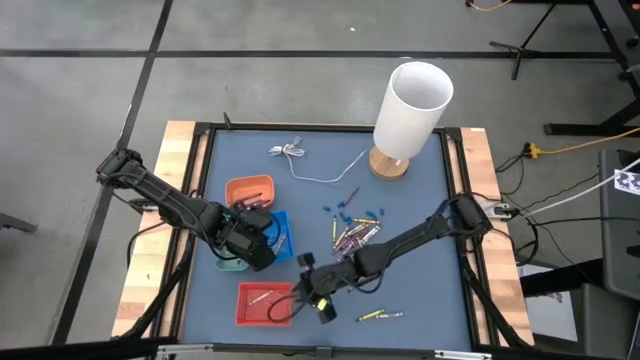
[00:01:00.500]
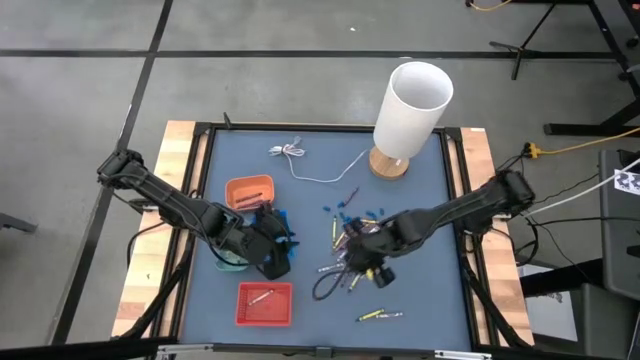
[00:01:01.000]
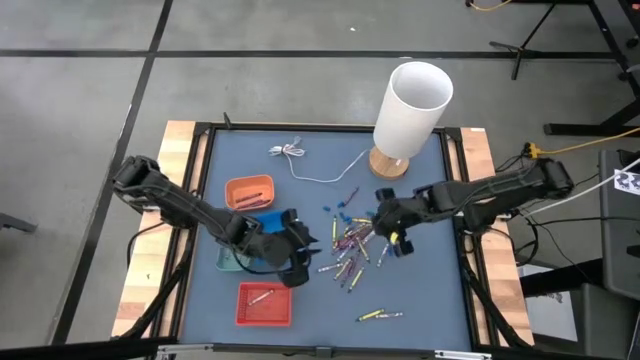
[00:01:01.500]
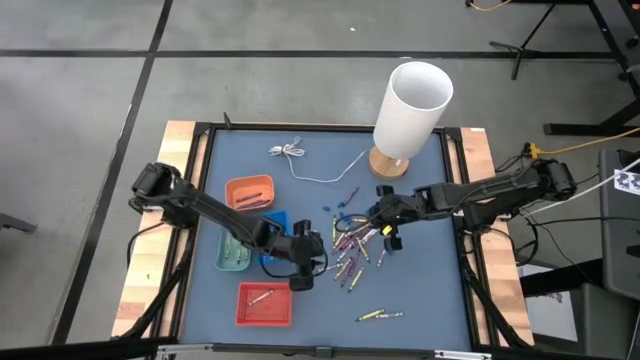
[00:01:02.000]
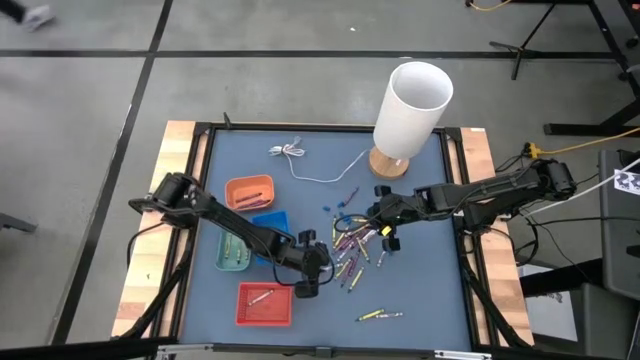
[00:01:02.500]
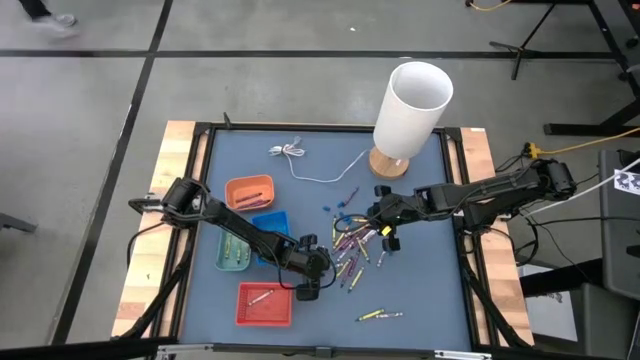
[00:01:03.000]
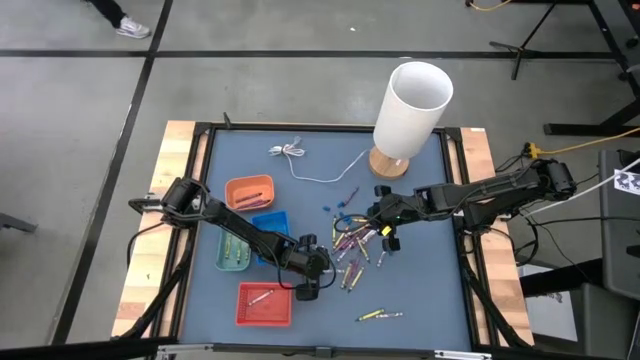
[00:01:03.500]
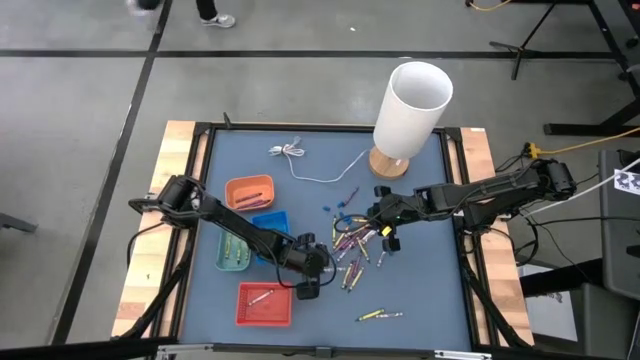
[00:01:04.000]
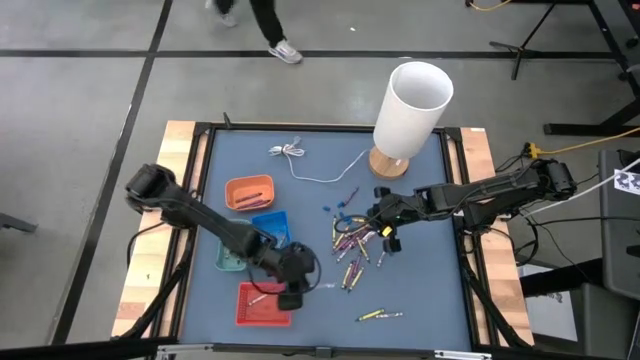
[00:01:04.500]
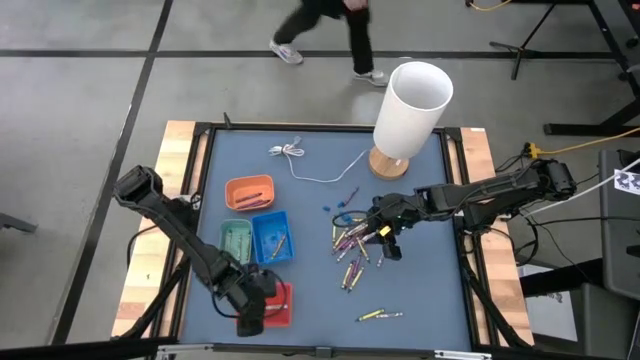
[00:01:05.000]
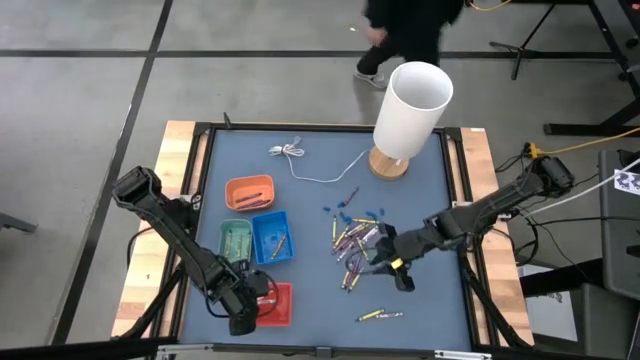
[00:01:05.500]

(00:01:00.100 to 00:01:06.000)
Task: Sort crayons
Put the grey crayon into the orange bin

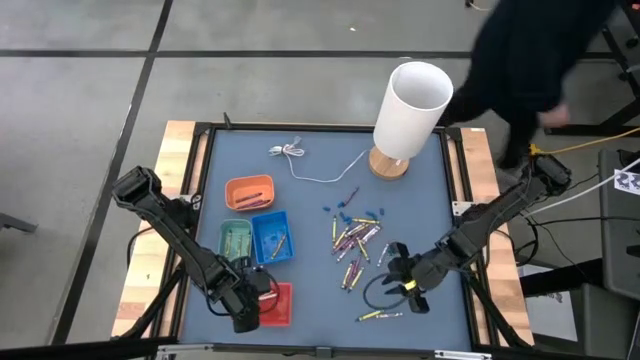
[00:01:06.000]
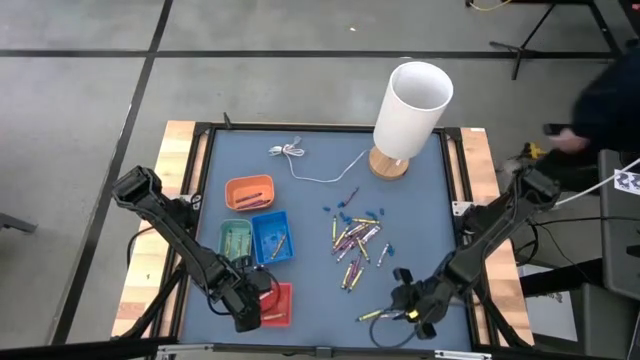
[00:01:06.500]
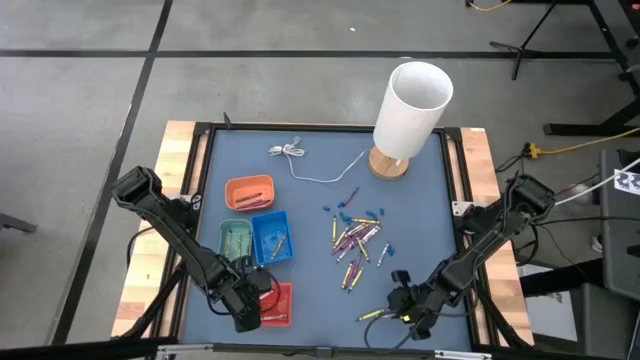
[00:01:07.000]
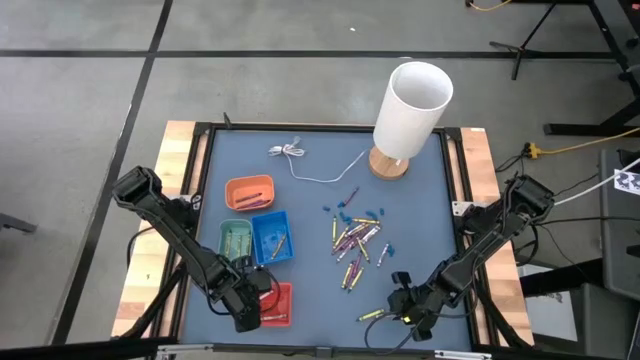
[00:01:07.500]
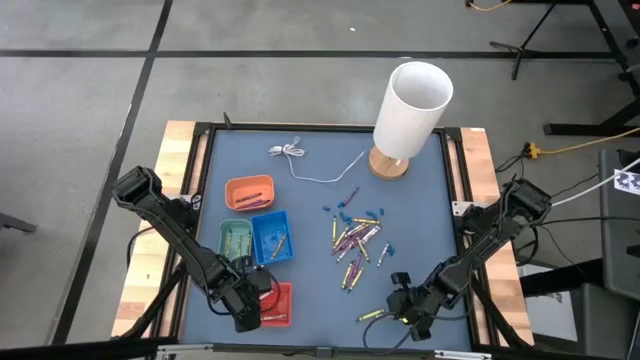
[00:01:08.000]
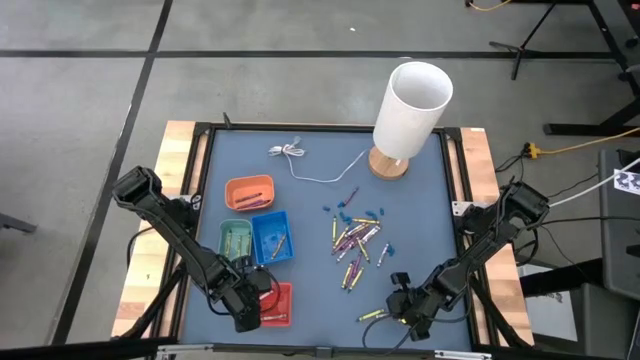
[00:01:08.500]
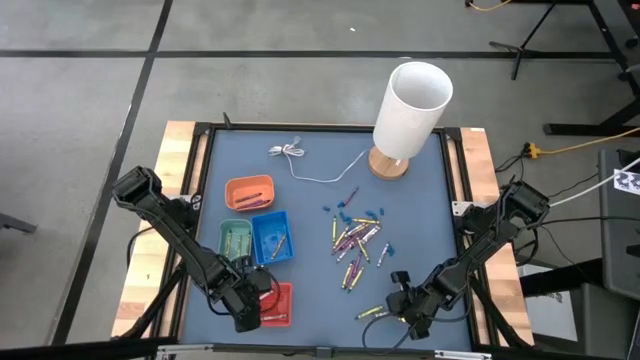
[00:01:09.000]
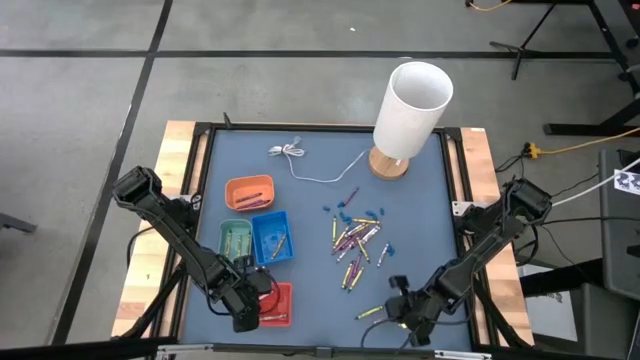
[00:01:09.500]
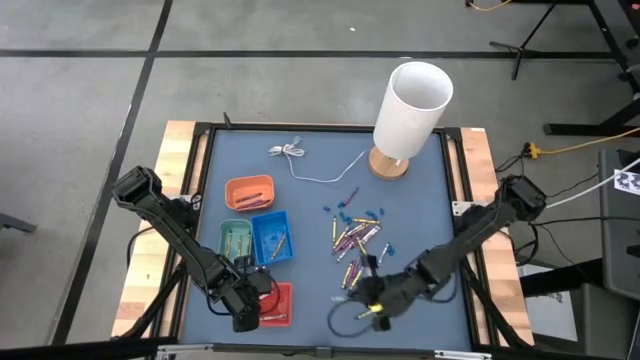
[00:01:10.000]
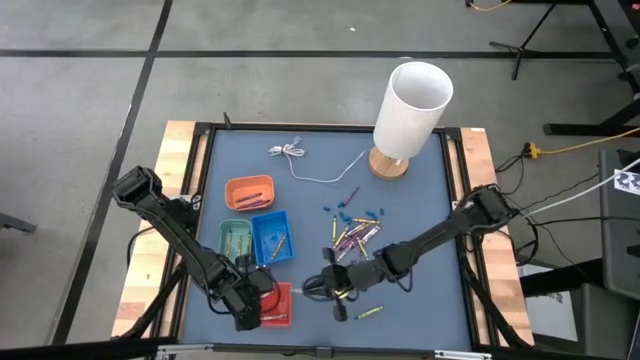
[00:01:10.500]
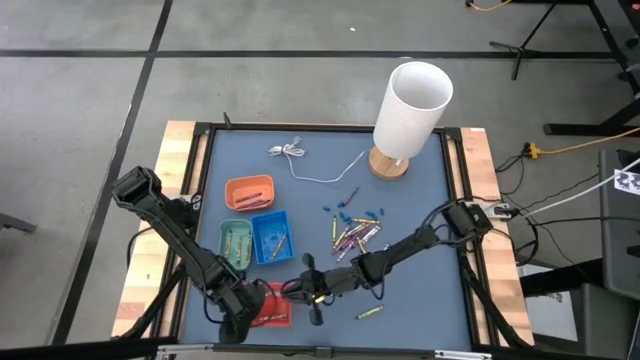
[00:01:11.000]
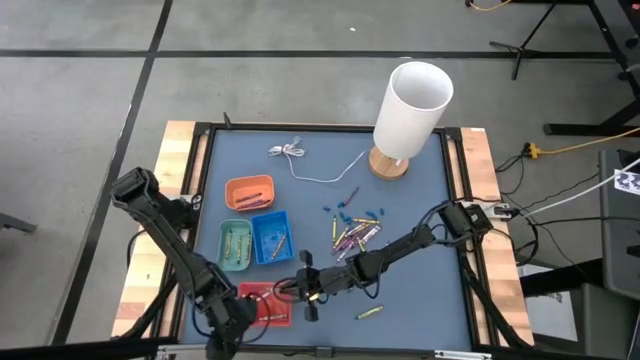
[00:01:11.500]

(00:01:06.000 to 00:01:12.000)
Put the gray crayon into the orange basket

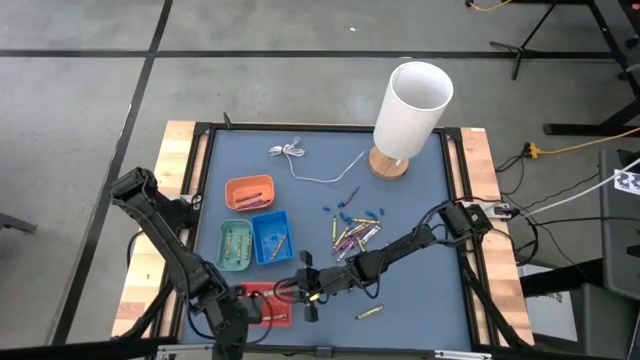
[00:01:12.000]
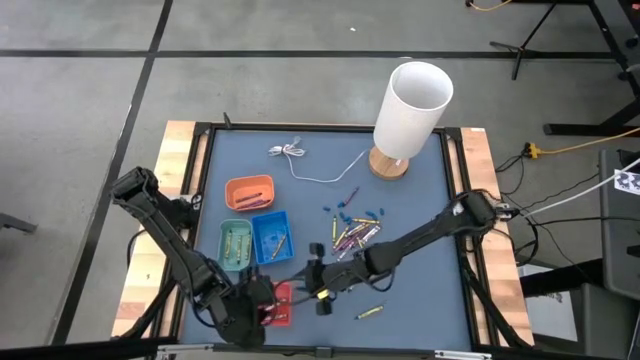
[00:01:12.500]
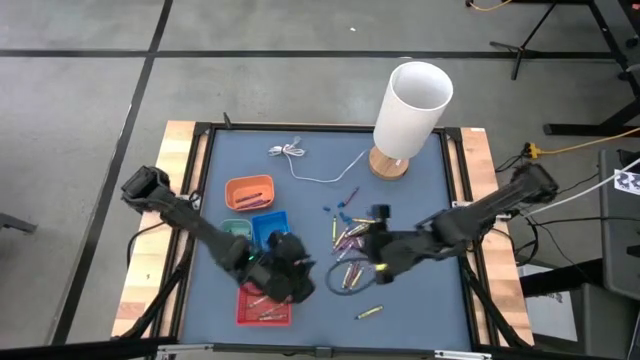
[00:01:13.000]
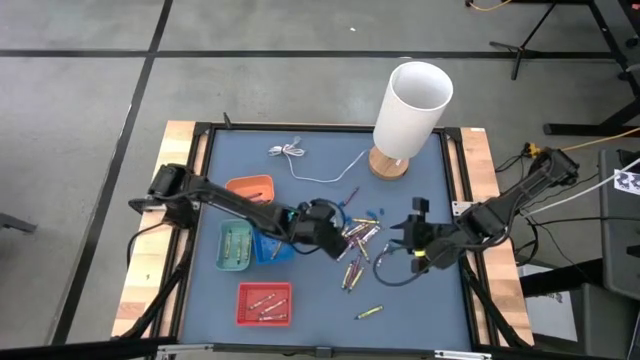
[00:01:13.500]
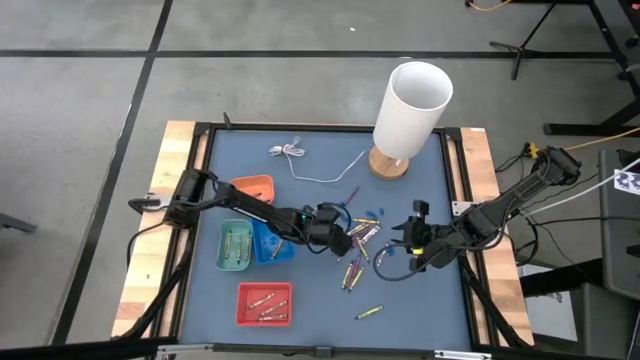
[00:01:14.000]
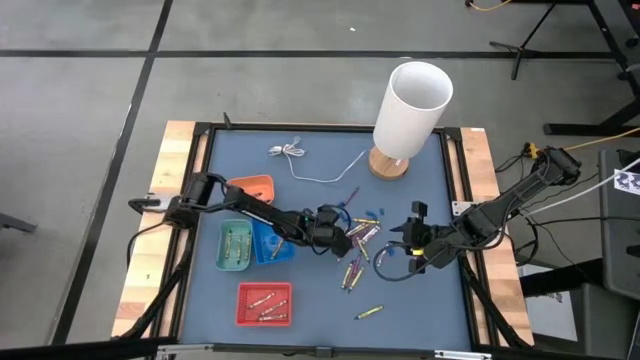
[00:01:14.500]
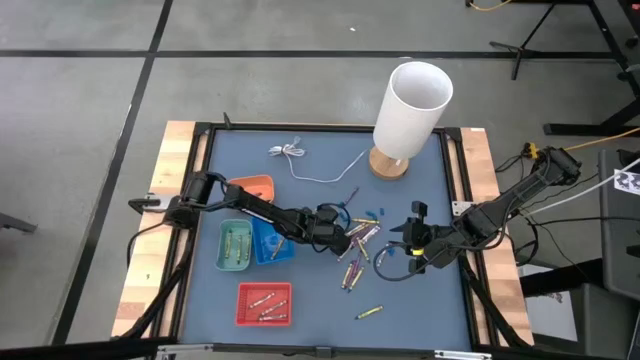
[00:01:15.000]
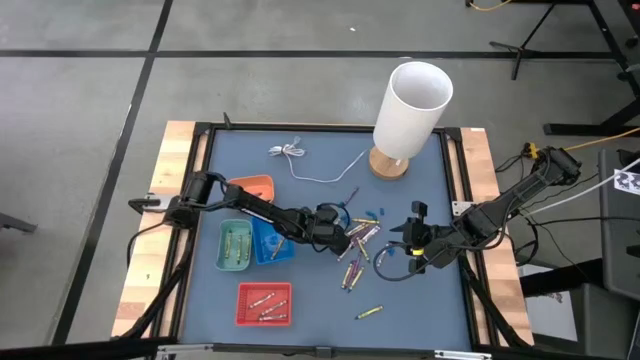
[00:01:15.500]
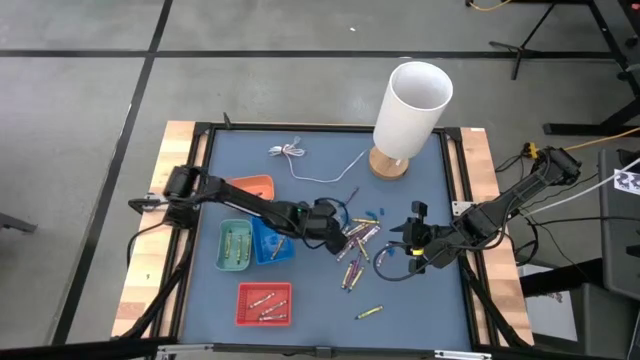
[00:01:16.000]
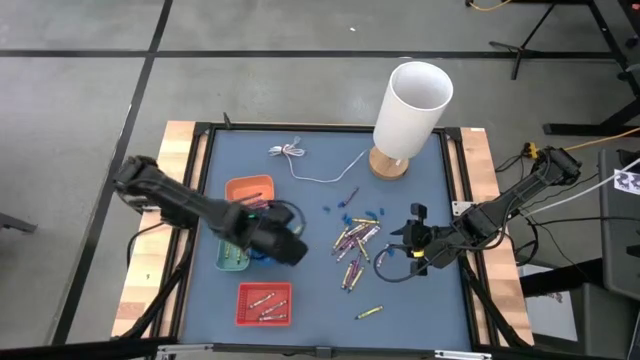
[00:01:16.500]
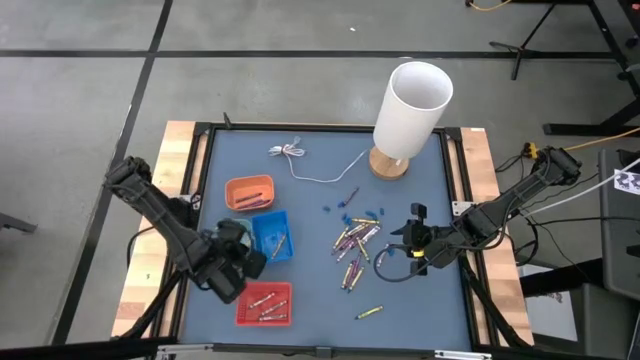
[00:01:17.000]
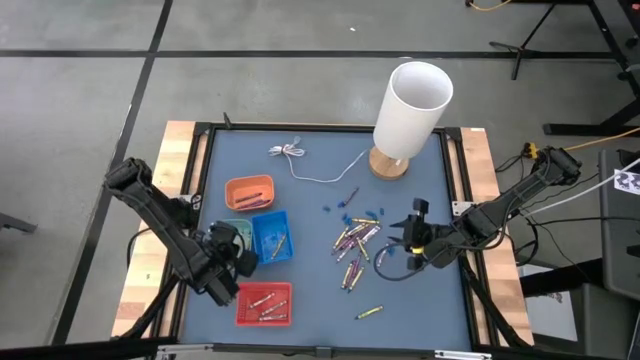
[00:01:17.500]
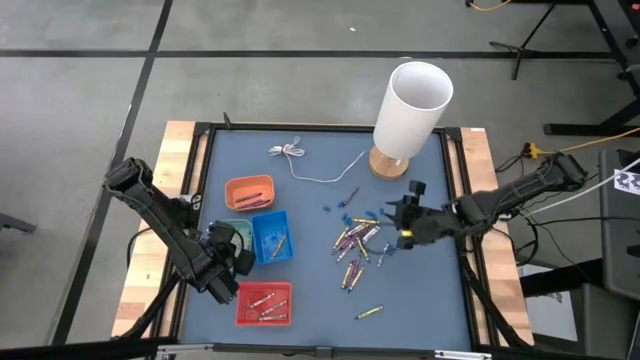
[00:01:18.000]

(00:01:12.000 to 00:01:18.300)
Put the green crayon into the blue green bin

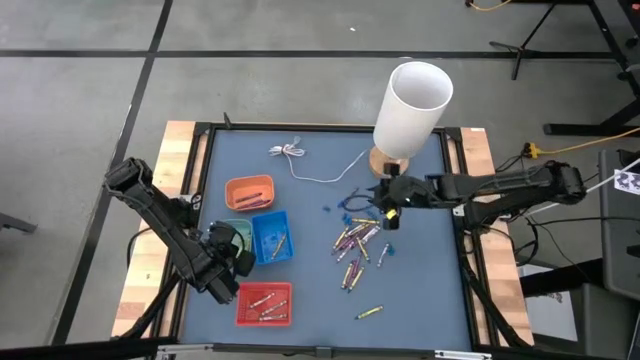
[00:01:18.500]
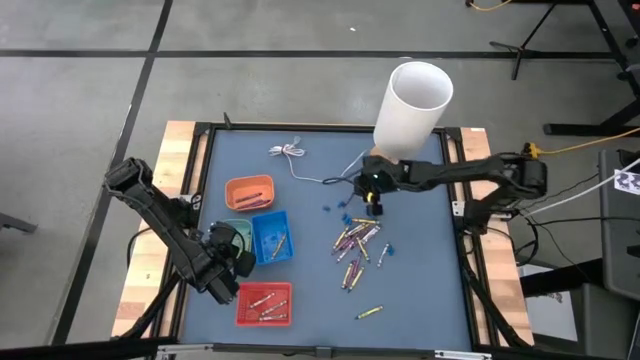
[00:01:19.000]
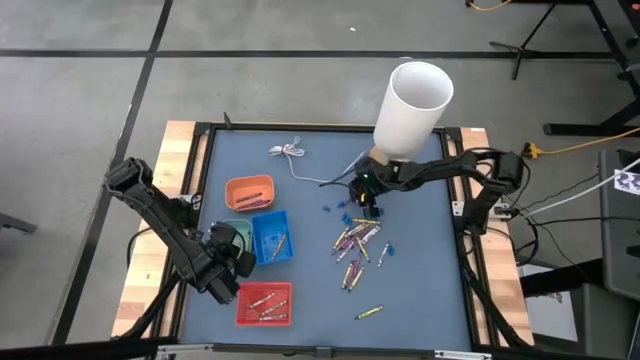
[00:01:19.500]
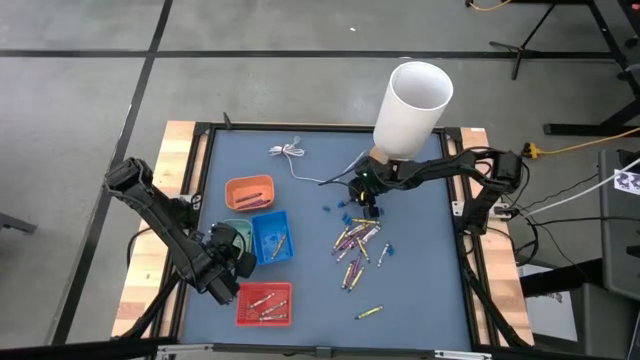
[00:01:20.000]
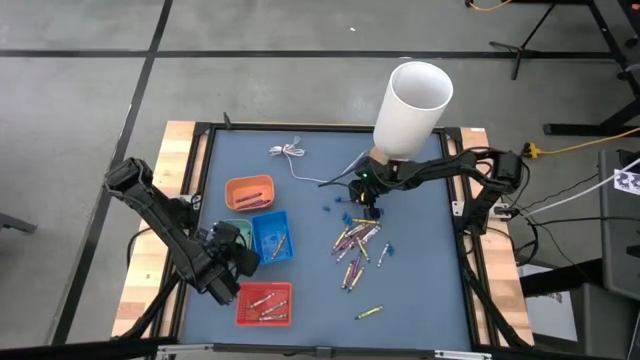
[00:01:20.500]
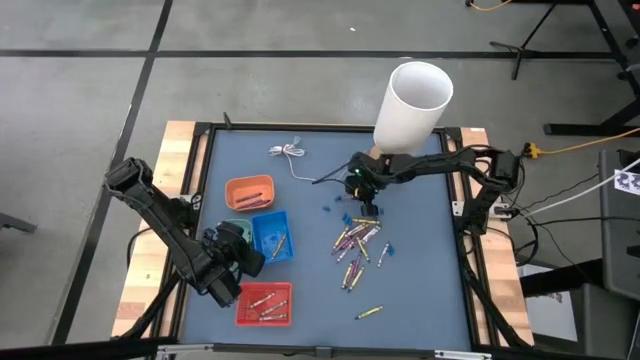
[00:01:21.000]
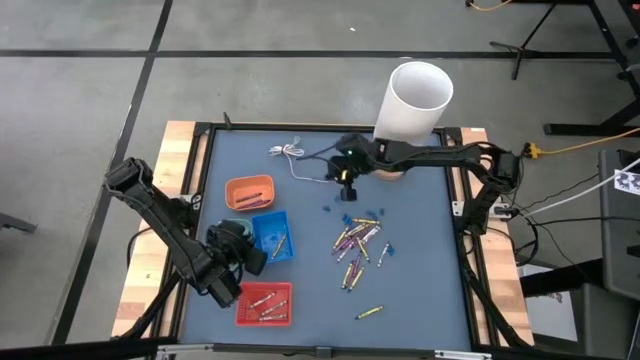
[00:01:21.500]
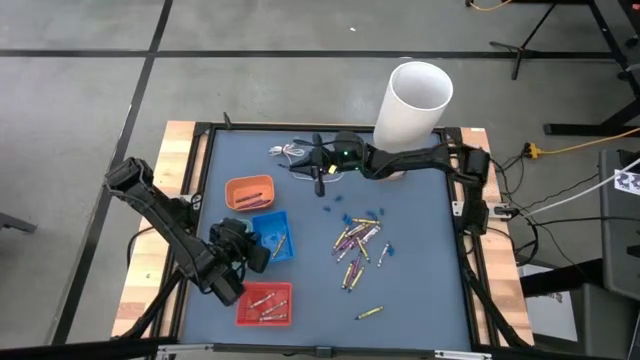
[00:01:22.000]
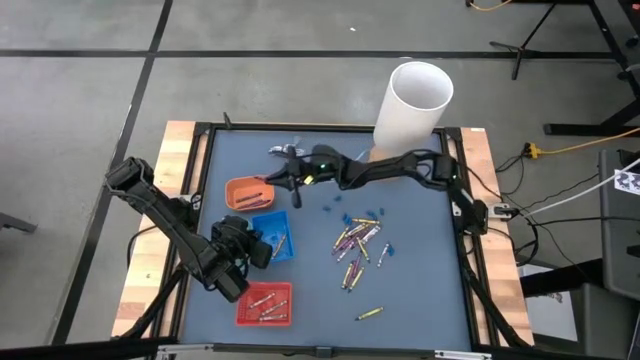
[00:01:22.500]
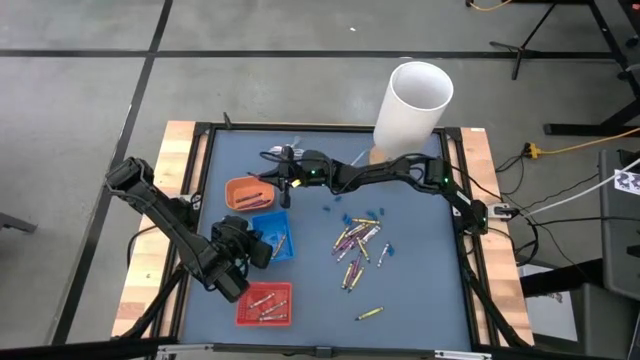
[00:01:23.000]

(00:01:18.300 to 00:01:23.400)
Put the violet crayon into the orange bin
